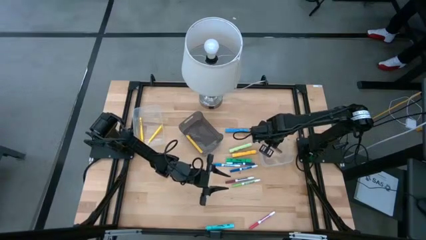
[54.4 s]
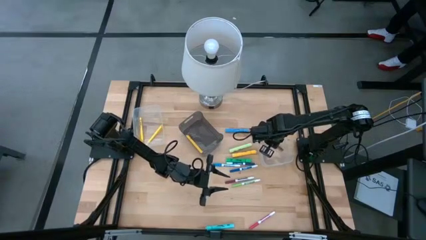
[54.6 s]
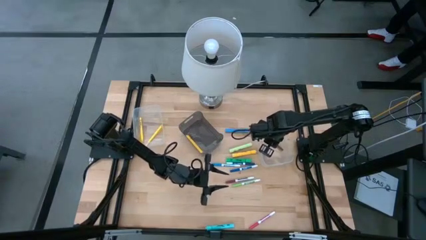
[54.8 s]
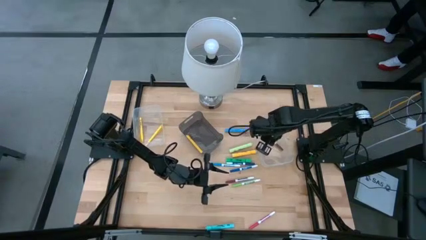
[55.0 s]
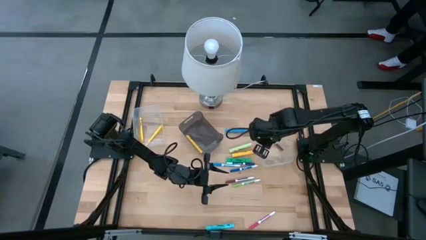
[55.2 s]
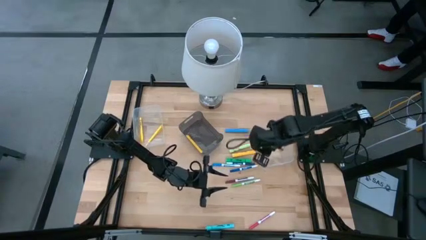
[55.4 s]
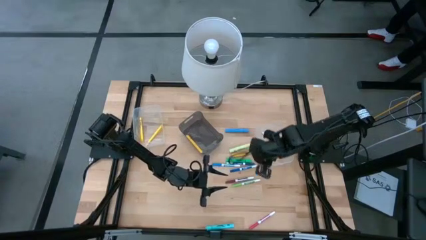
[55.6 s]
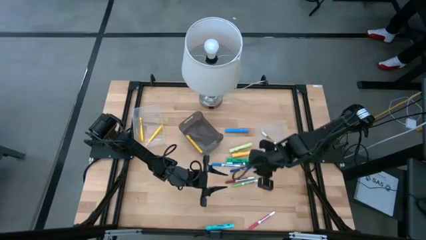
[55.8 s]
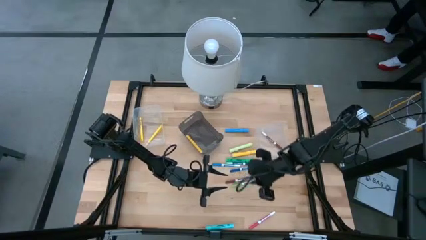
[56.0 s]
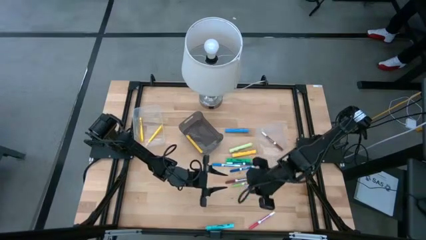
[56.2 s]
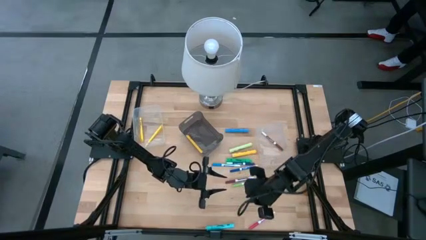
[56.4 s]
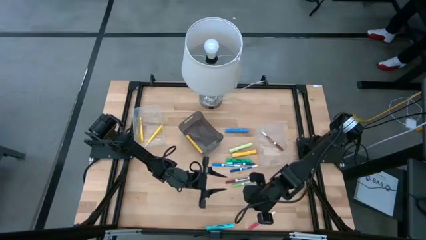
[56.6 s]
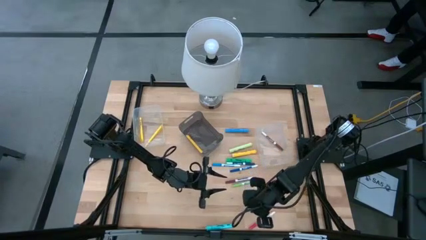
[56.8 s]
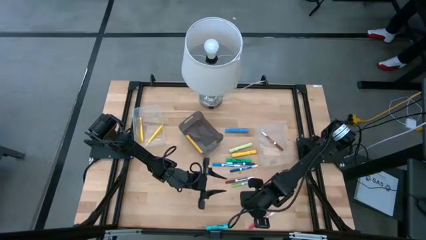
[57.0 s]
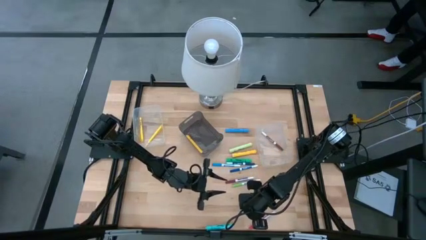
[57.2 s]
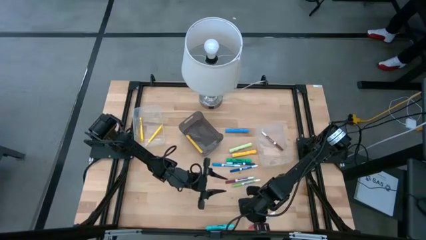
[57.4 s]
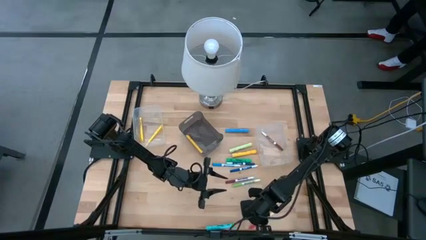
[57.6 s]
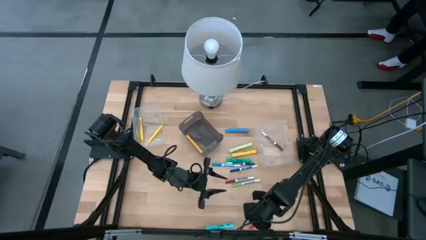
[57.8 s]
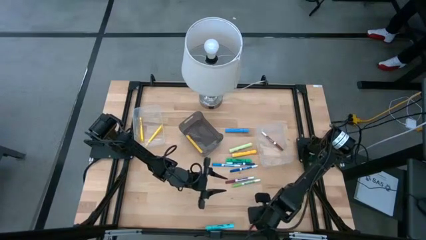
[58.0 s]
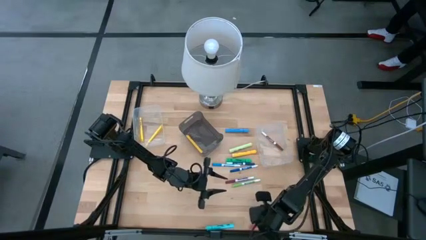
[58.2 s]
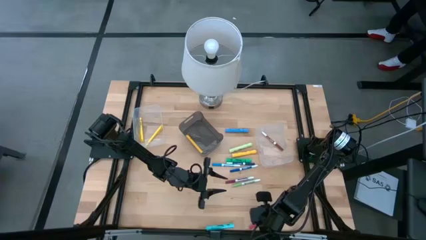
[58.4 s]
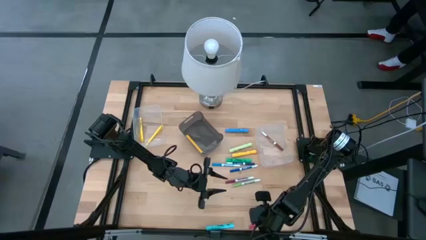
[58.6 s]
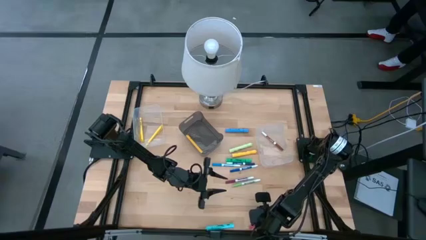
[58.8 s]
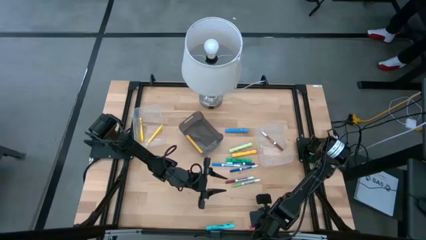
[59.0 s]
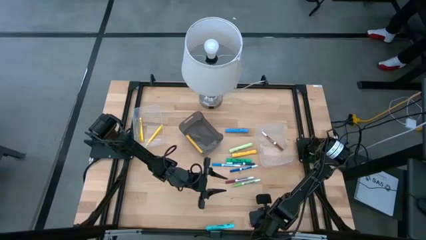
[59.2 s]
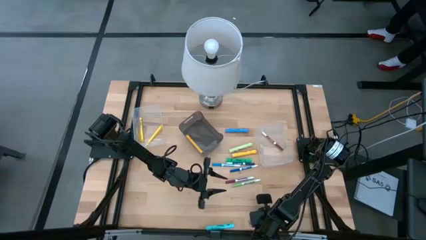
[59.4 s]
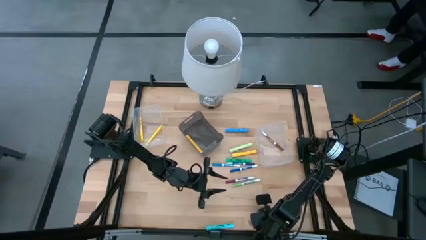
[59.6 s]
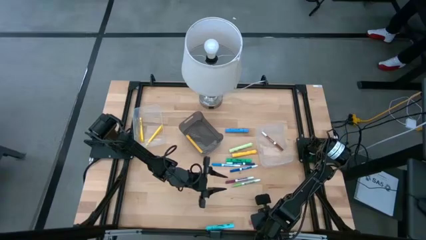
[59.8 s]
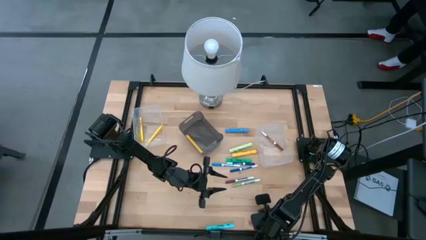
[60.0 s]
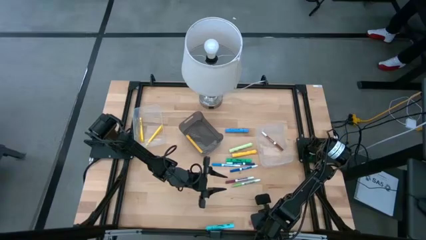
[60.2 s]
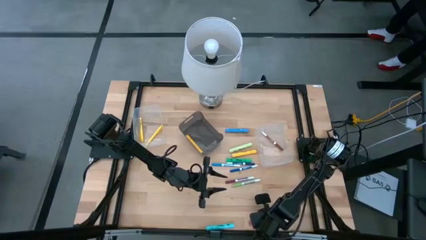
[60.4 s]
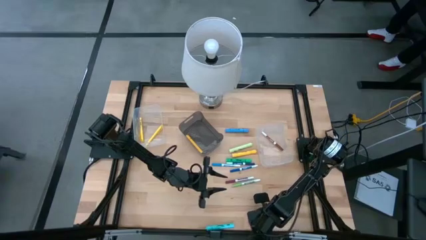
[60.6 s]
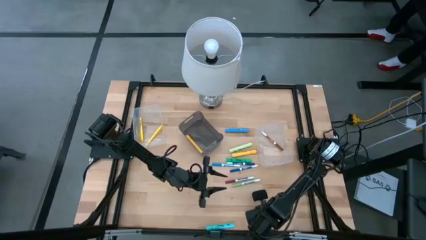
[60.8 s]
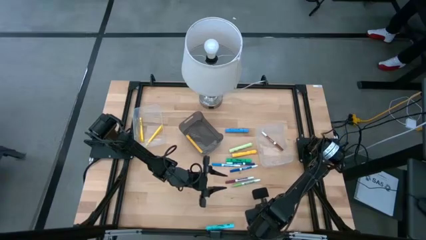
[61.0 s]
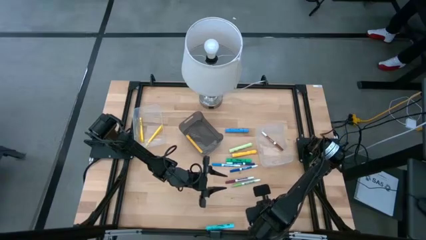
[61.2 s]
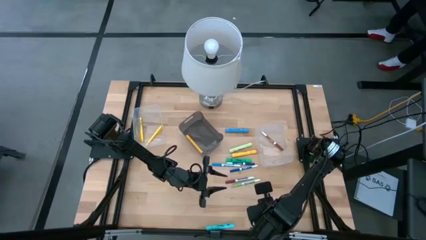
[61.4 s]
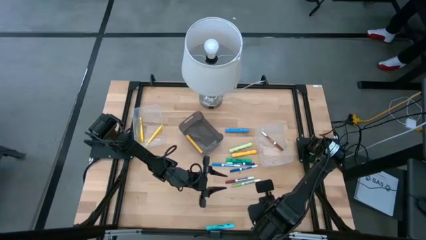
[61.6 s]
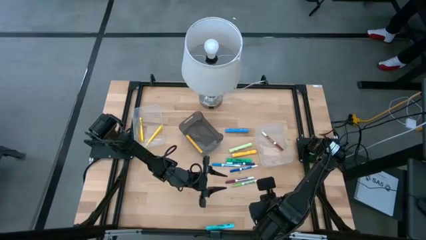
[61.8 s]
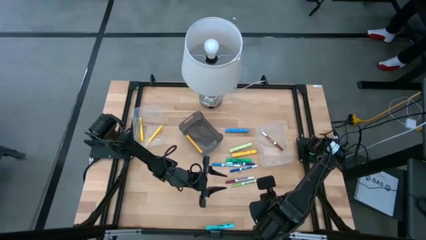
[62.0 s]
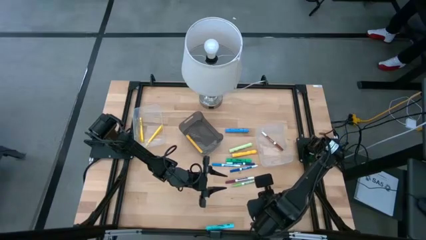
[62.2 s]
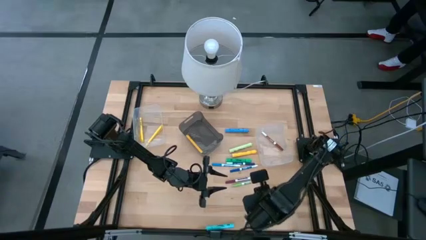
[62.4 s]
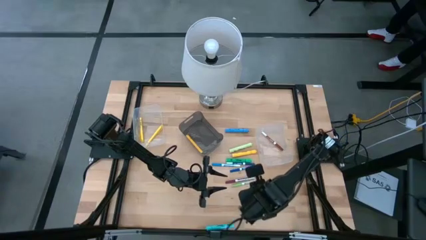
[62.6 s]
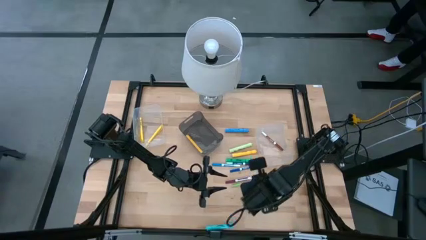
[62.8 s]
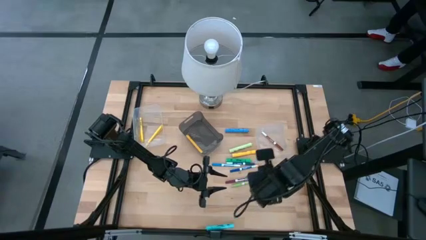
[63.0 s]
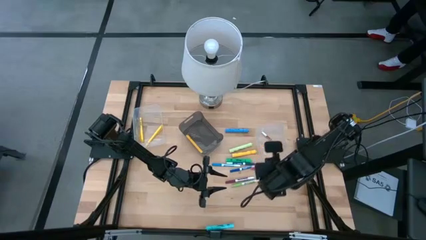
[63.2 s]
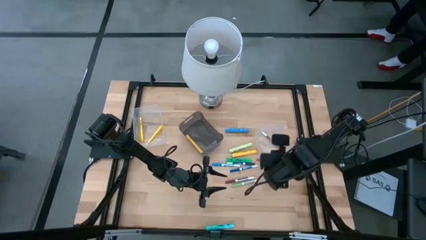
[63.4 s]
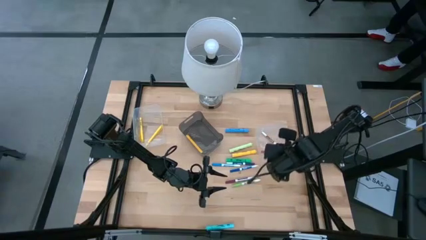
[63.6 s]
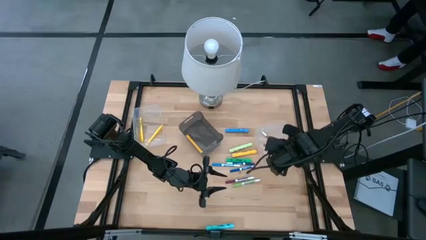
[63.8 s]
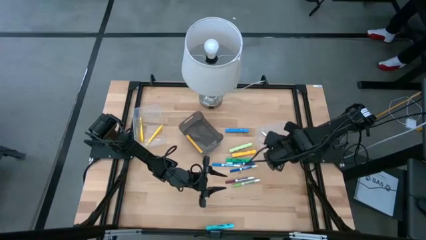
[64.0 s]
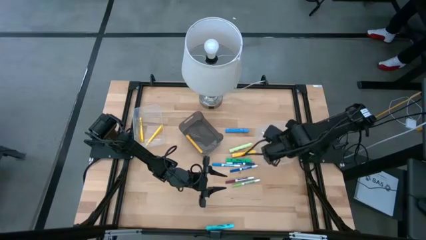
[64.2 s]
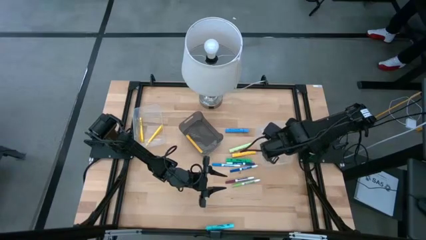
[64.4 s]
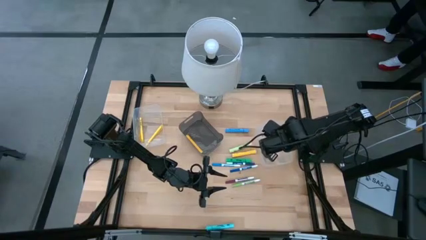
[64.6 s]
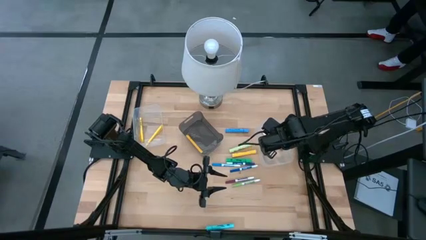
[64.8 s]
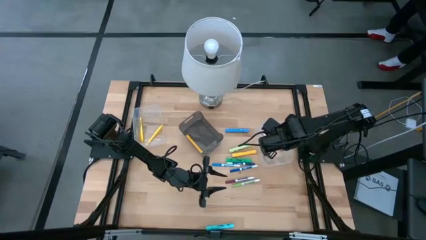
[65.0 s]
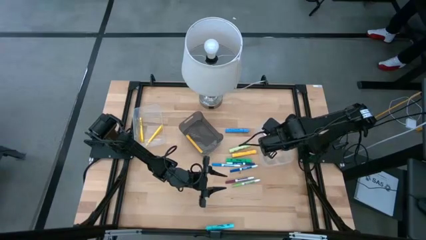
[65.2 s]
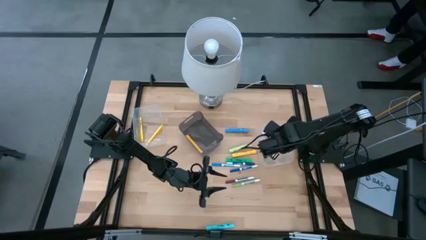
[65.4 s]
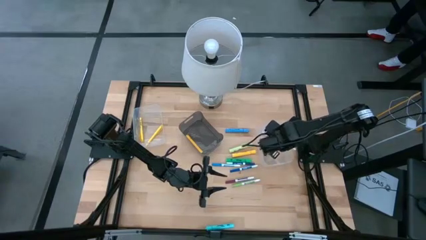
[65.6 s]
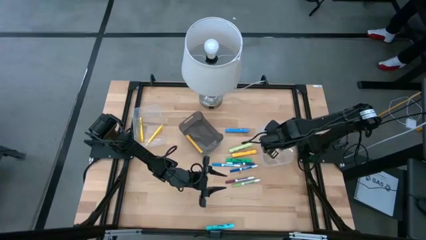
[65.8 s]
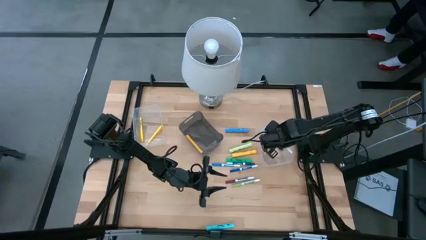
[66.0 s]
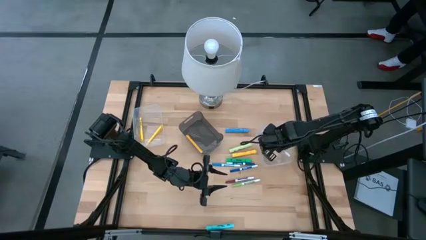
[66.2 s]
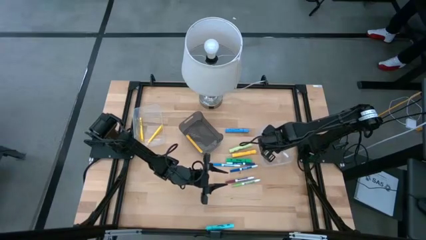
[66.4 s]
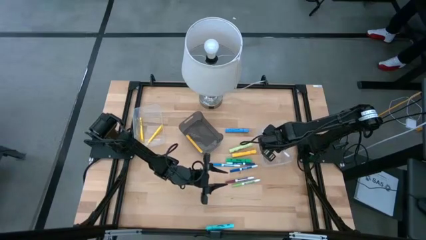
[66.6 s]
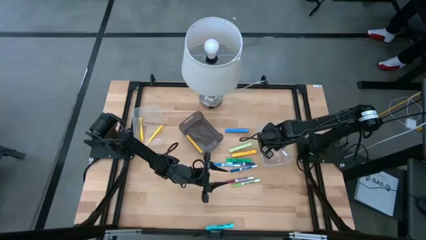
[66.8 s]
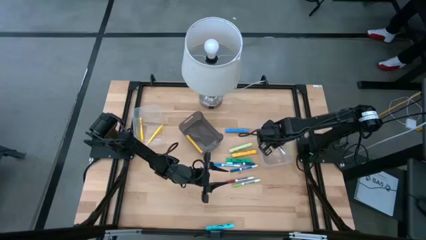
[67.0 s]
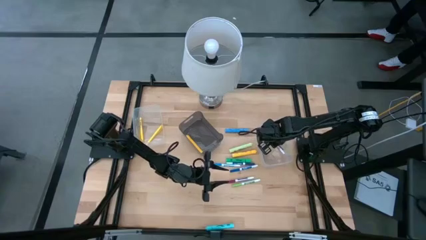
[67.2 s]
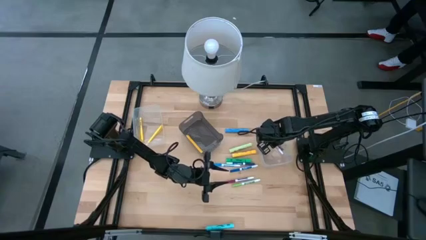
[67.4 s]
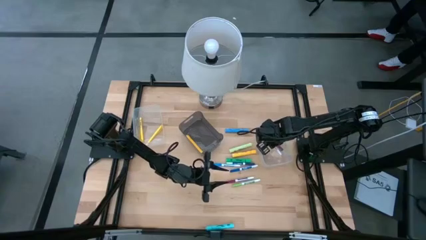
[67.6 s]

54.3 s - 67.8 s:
Task: Pick & Place Markers
Put the pink highlighter into the right transparent bin
